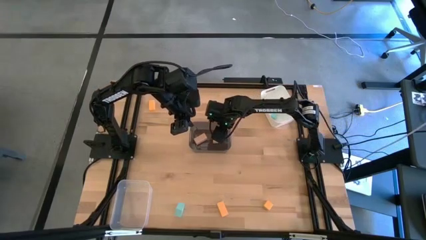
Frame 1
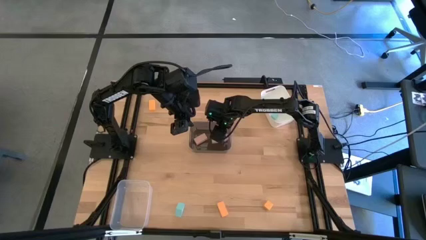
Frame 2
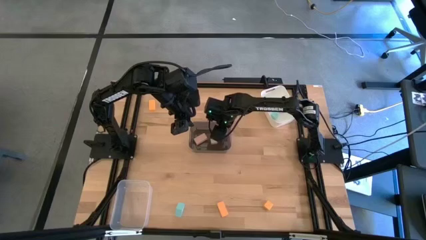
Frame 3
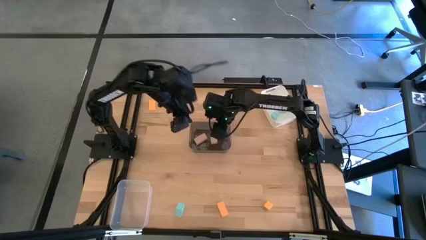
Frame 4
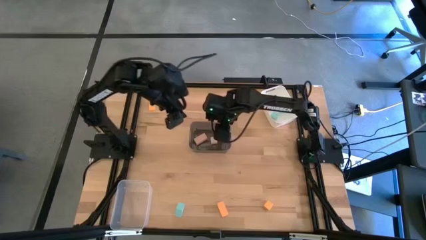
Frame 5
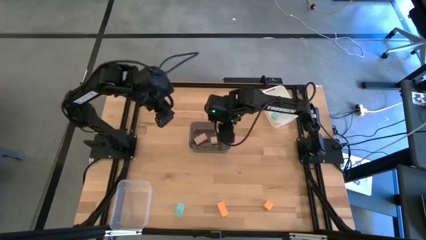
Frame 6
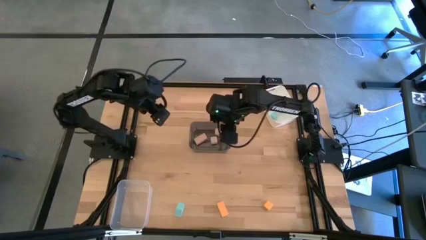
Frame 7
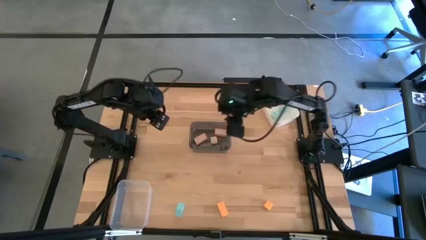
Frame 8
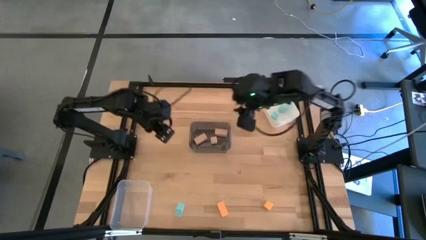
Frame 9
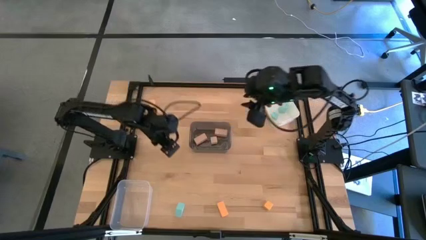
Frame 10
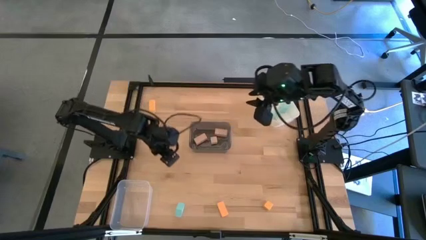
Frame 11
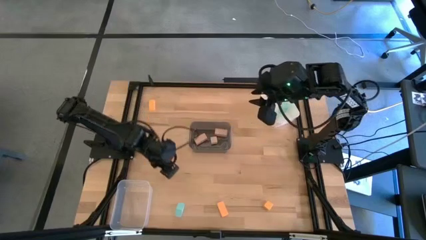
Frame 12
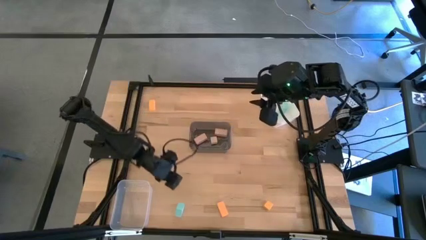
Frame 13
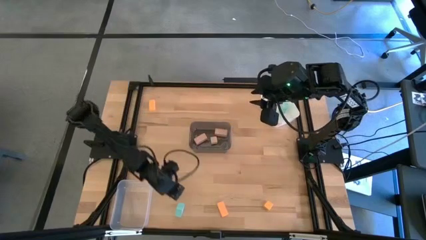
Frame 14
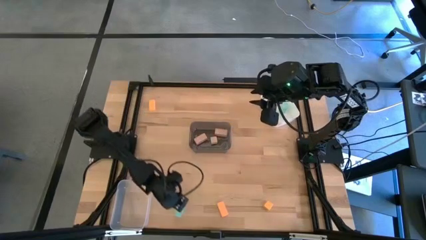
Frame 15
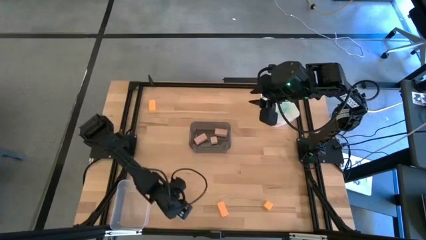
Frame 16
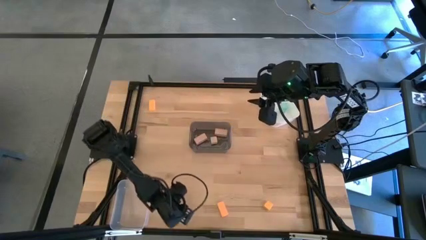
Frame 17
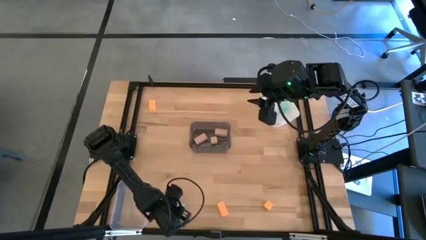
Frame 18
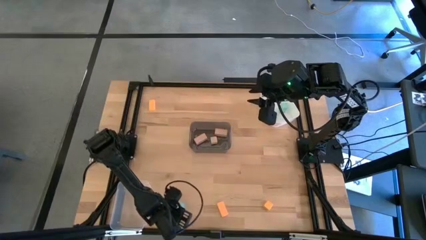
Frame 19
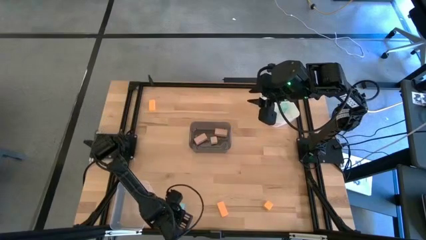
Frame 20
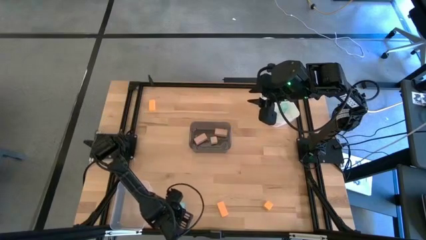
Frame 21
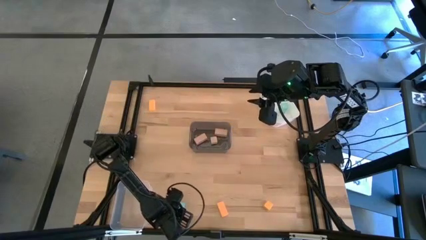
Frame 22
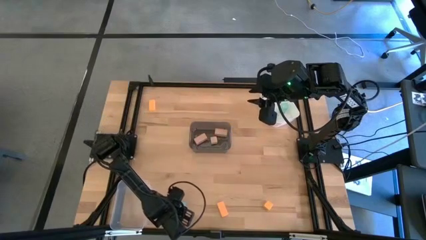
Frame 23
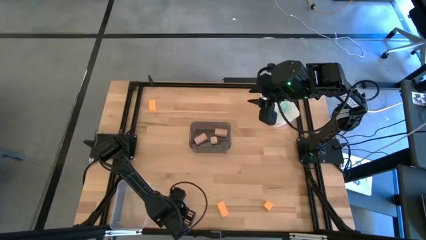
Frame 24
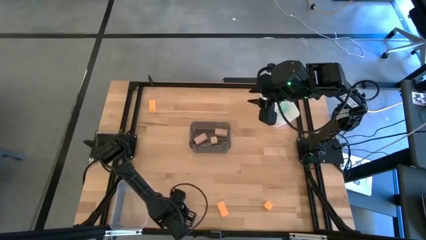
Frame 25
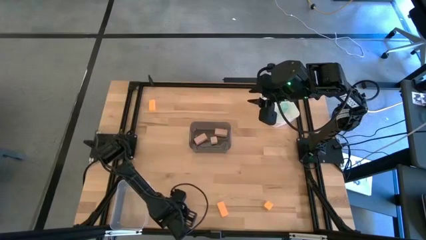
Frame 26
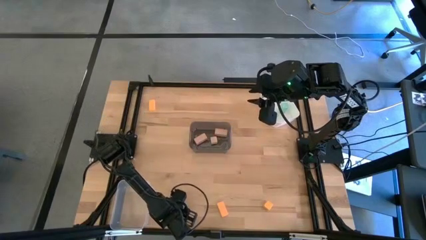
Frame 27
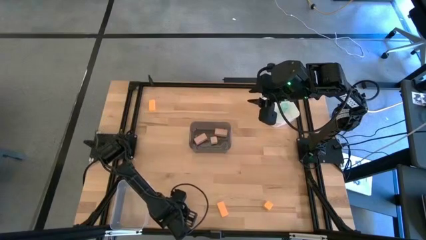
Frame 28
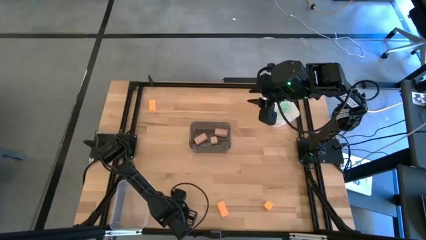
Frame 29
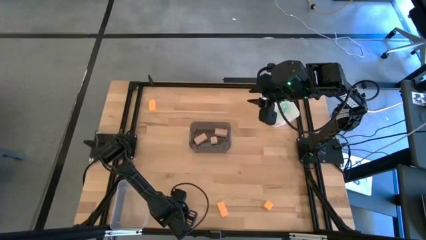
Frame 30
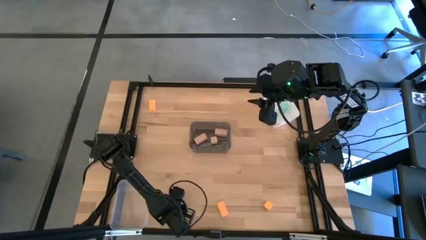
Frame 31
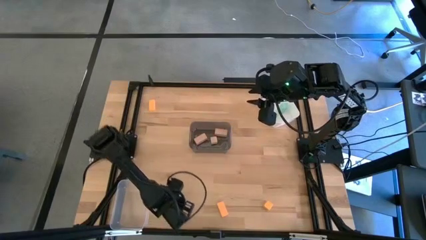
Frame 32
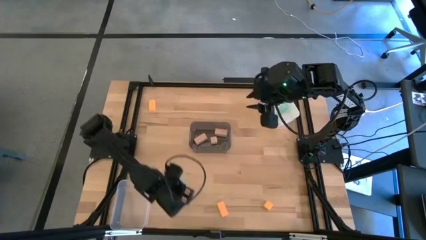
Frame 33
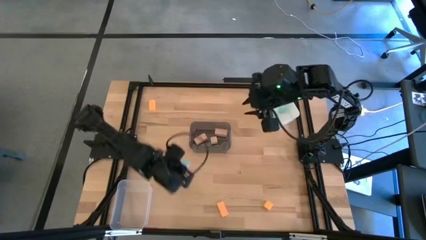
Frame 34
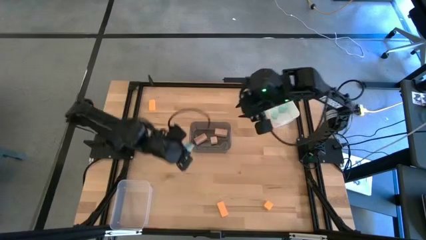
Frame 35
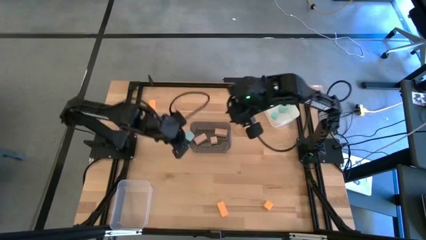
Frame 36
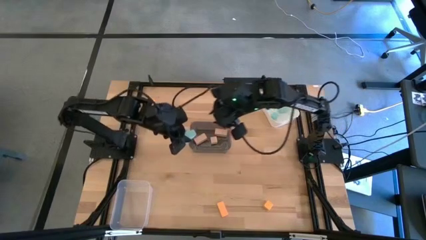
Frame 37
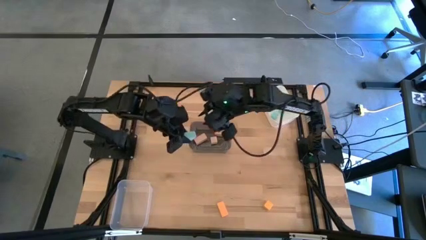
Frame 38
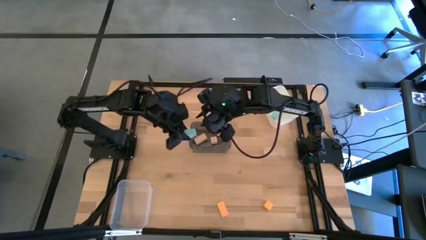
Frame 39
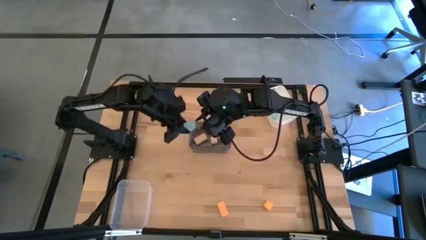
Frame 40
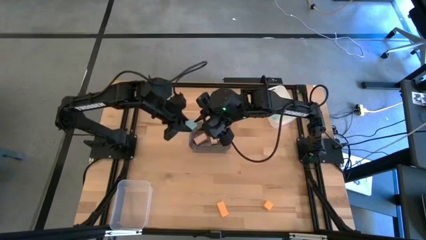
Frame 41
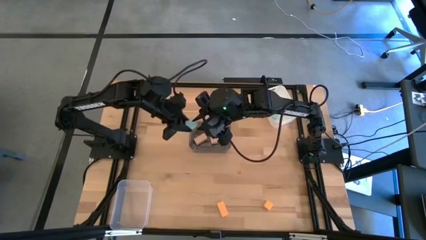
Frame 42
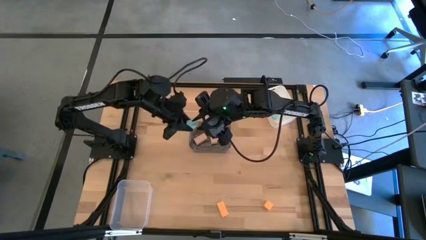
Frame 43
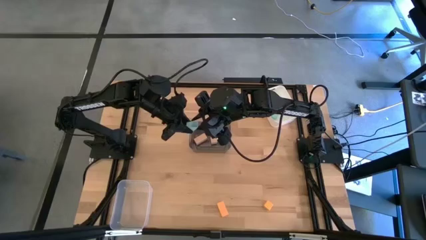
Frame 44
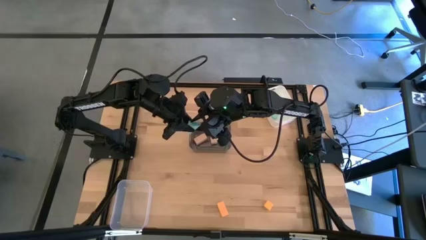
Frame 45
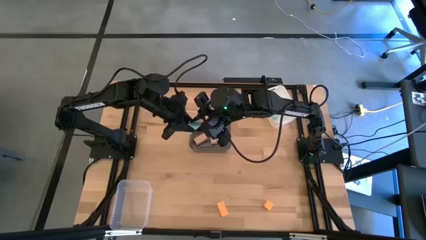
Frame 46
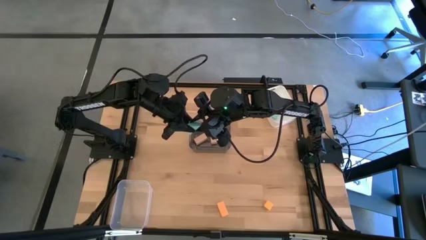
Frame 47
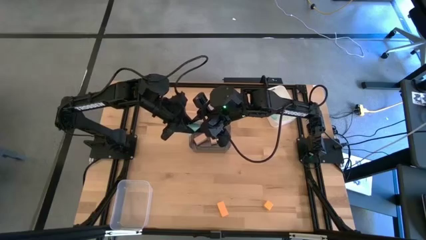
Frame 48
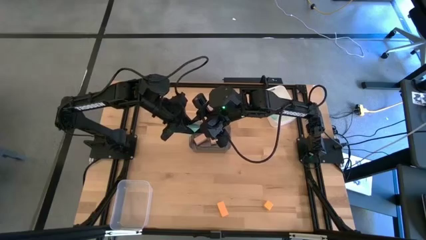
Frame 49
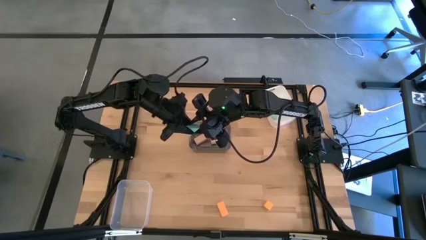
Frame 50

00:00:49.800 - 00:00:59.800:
Task: Sort & place blocks by color
Put the blue block into the white bin
